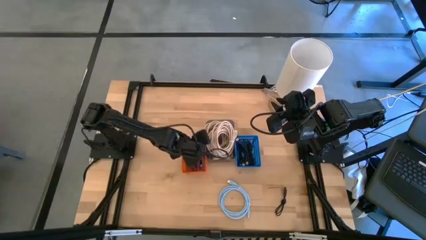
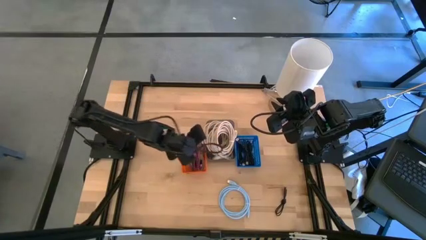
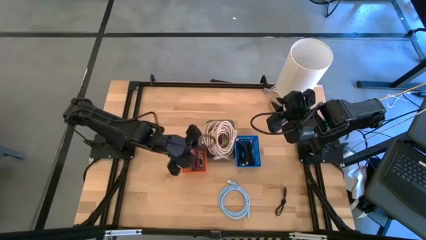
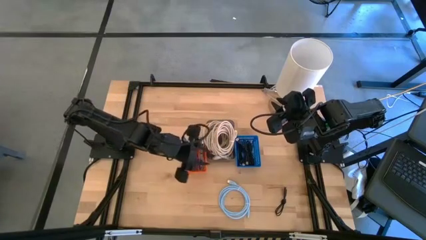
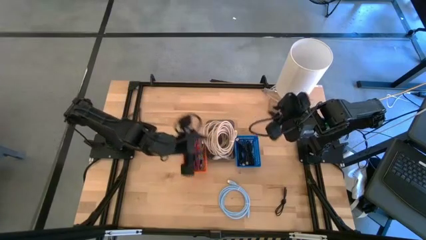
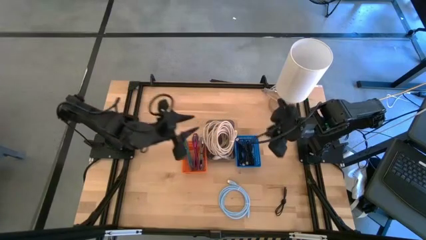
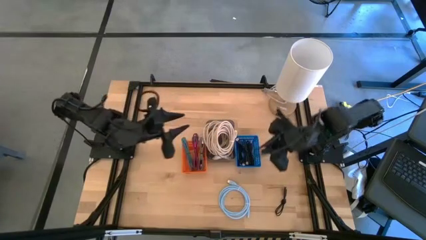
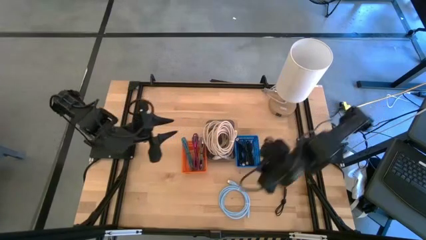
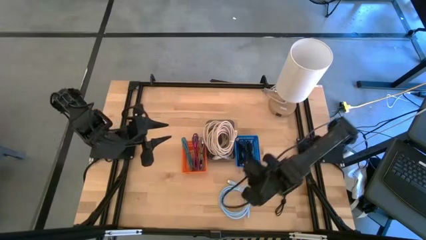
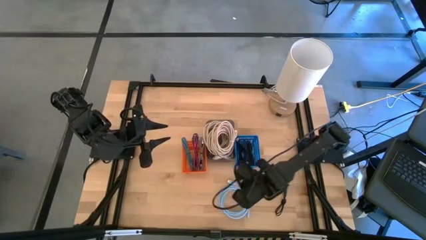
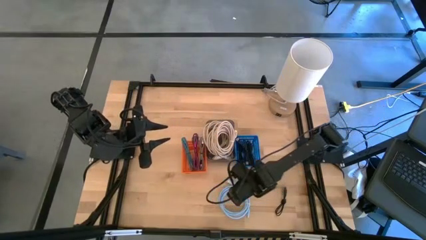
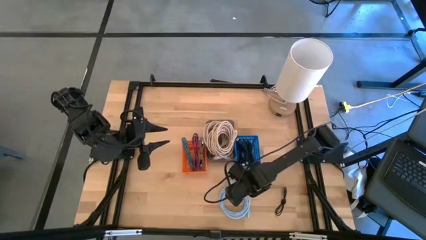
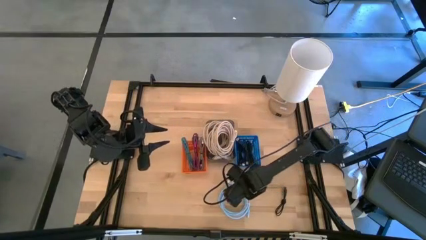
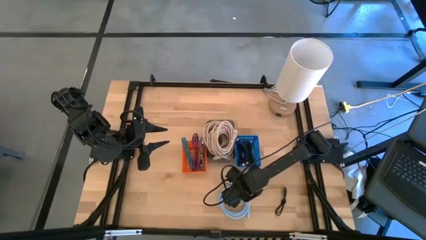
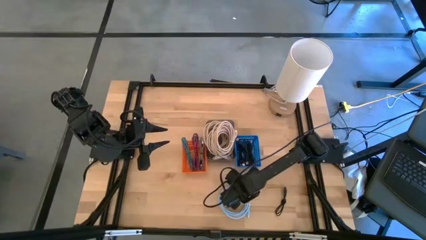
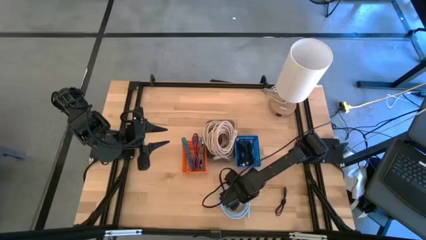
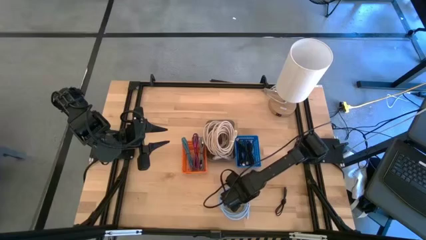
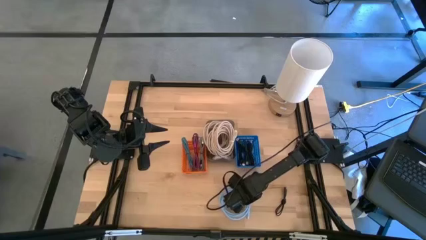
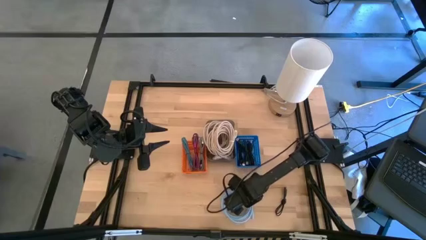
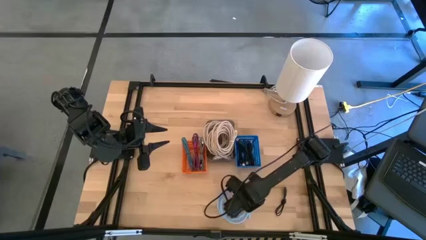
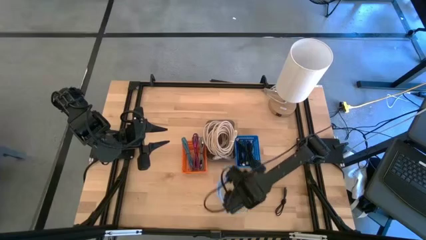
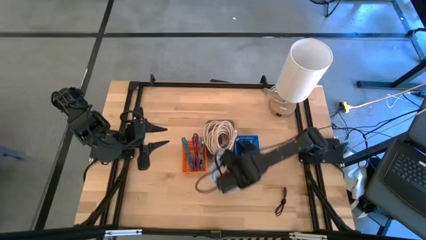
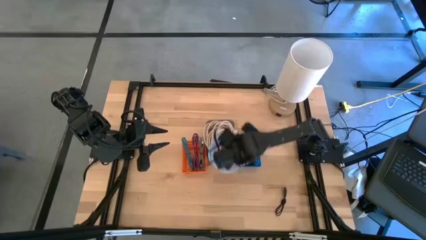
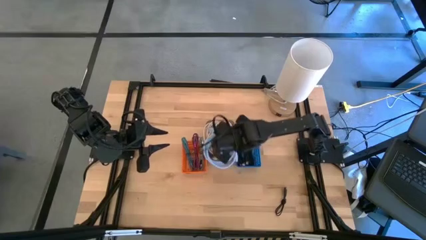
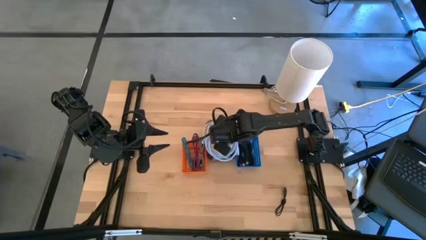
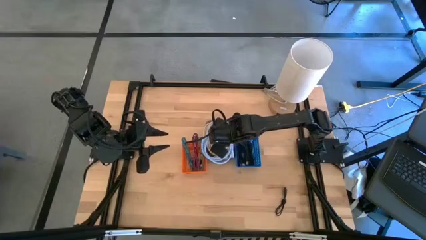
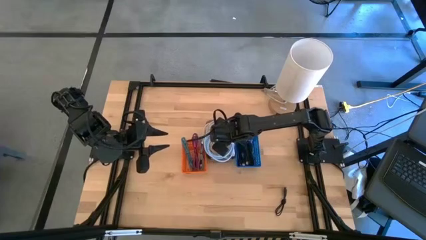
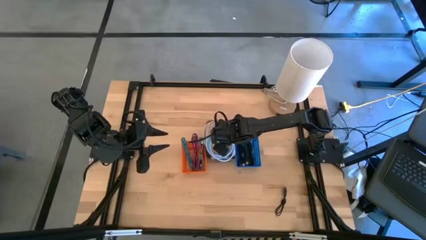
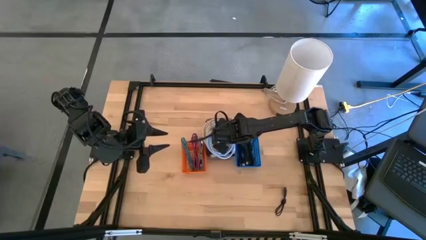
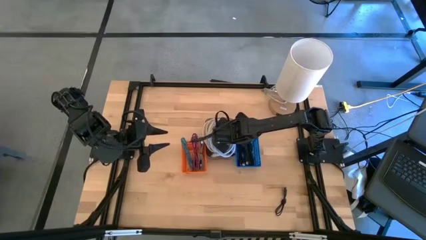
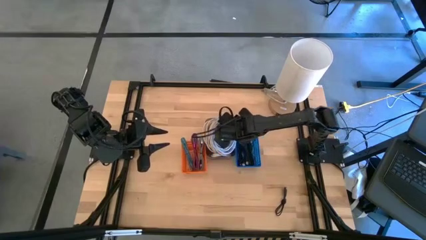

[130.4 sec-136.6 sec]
Task: Pick & Place USB Port
Put the light blue HDMI cable into the black bin

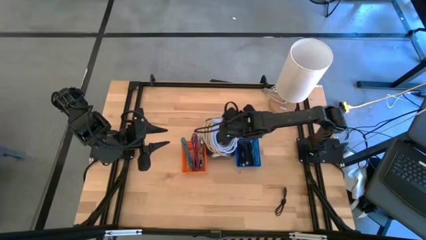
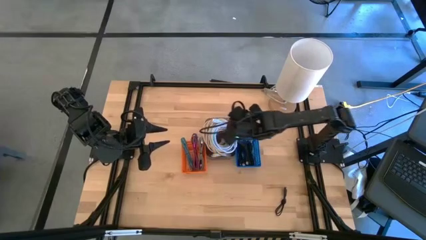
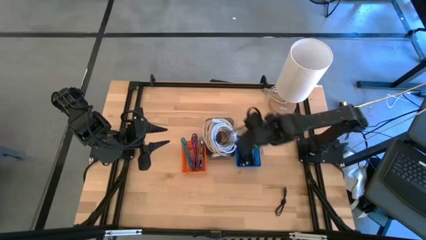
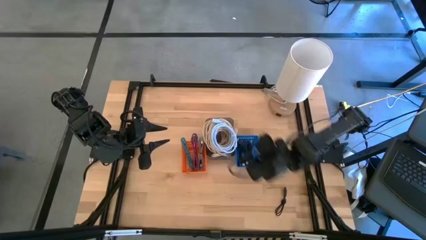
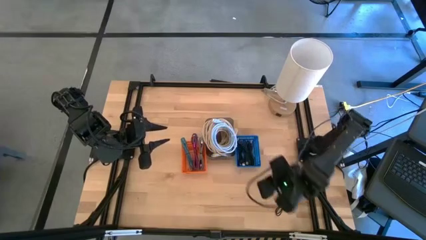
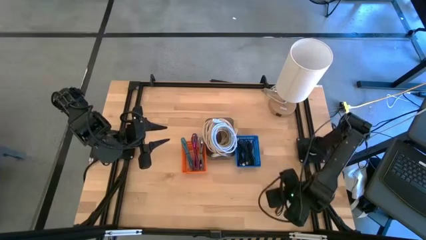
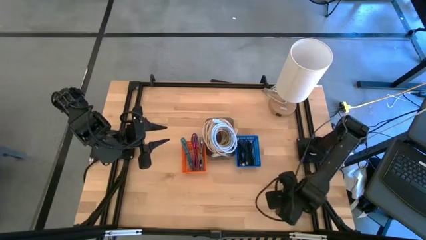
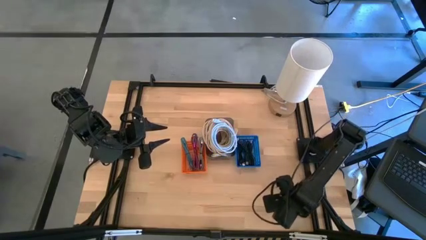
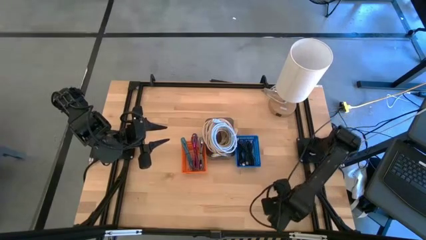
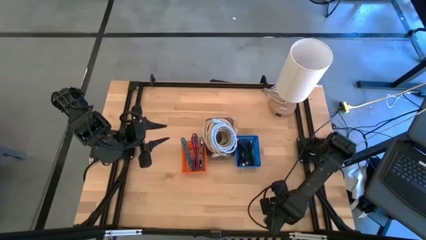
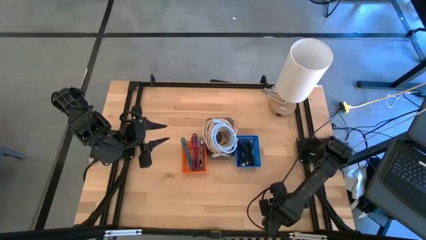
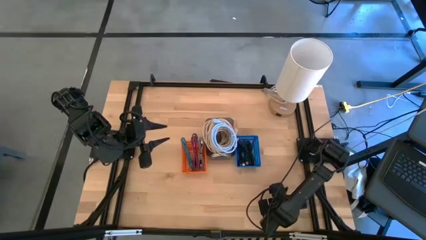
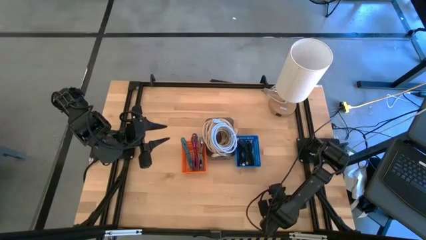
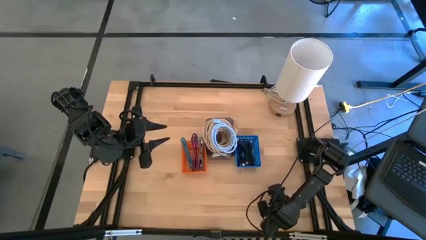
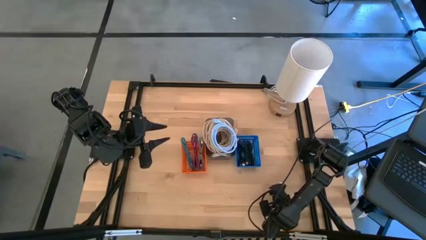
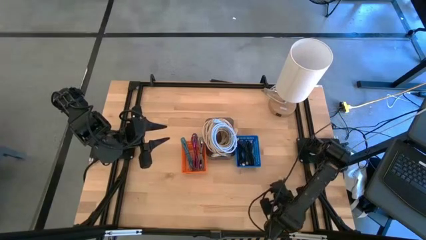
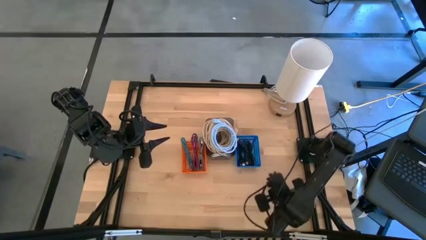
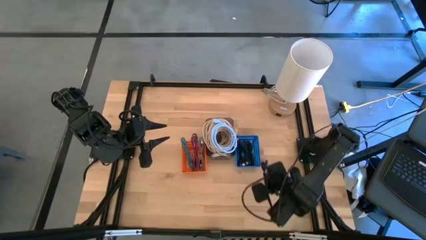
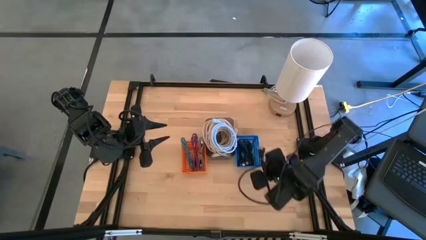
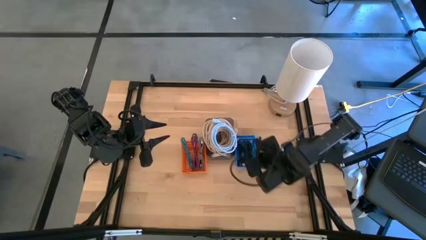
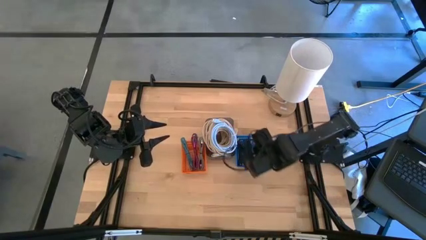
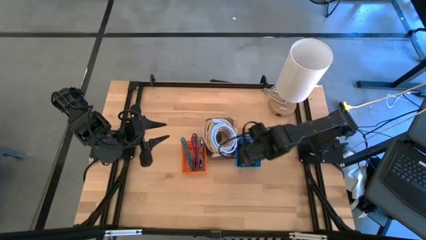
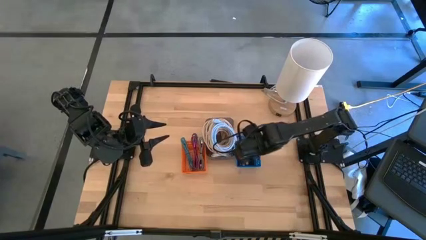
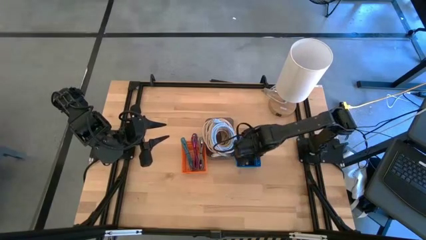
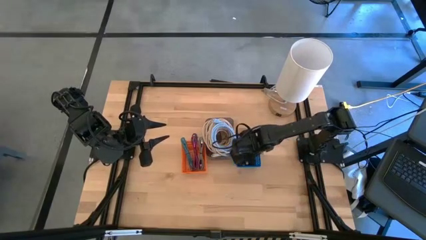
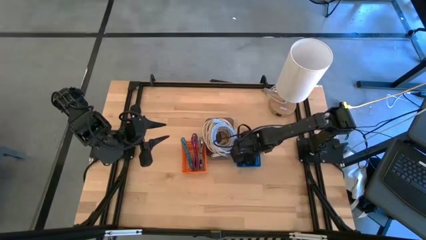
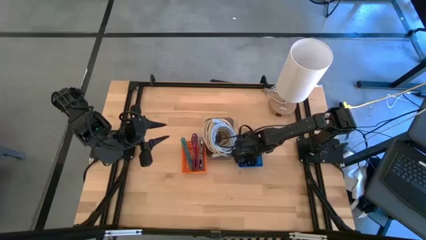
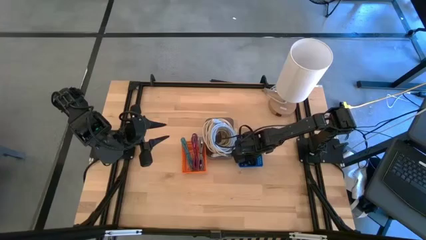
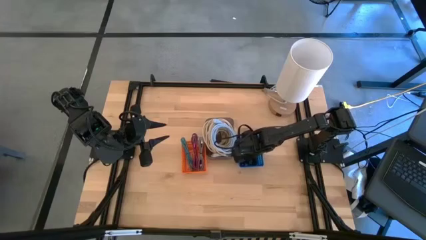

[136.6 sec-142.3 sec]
Put the black charger cable into the blue bin

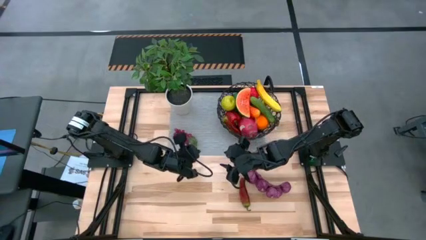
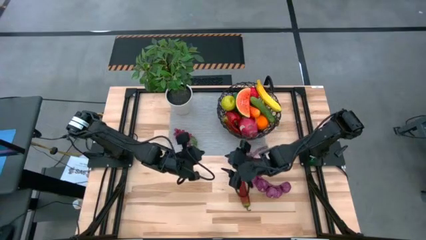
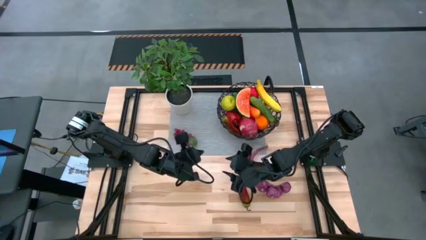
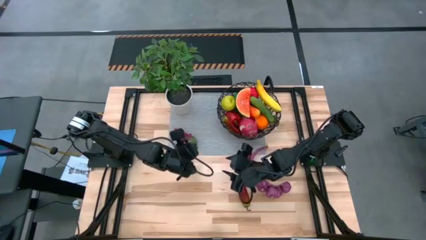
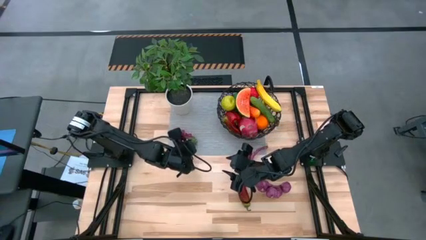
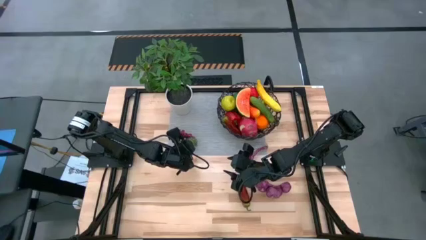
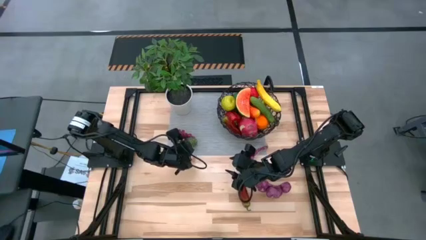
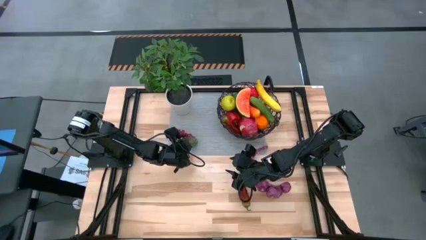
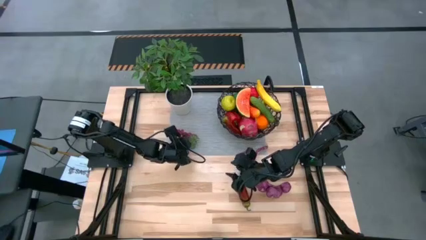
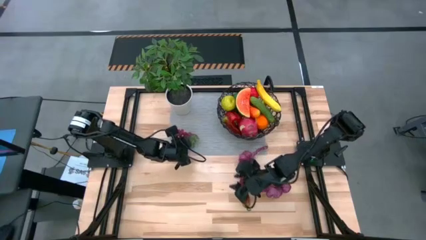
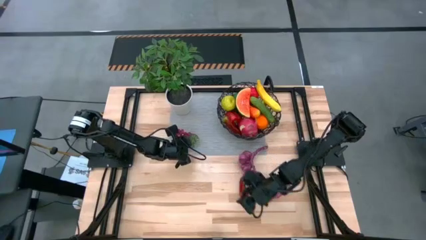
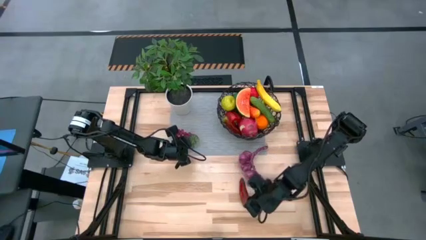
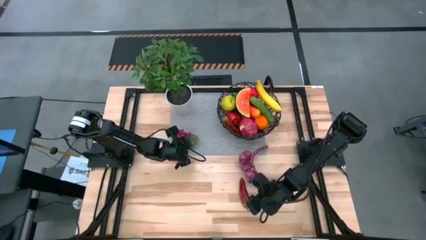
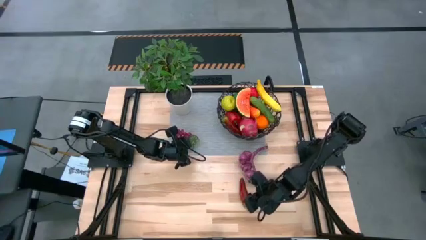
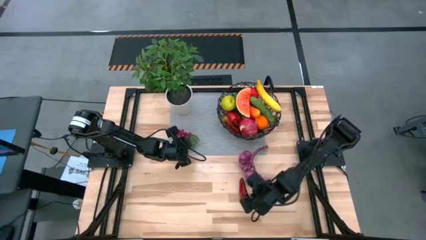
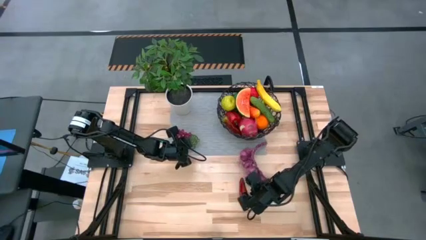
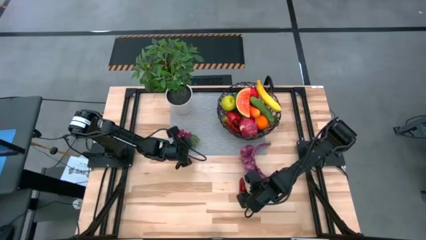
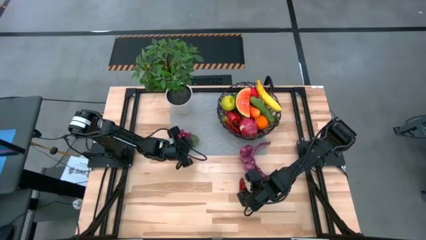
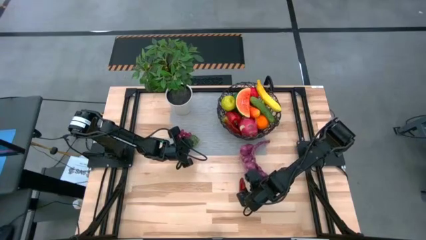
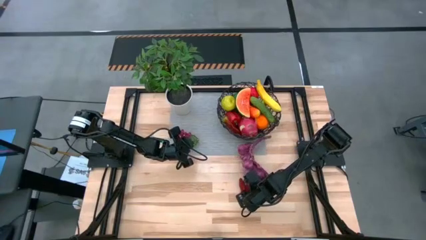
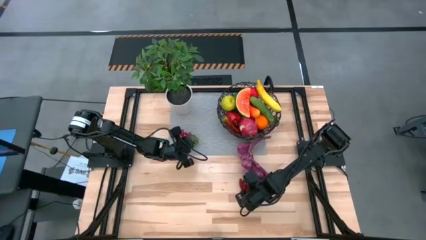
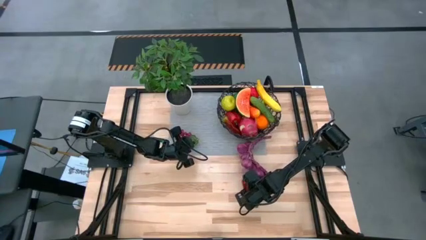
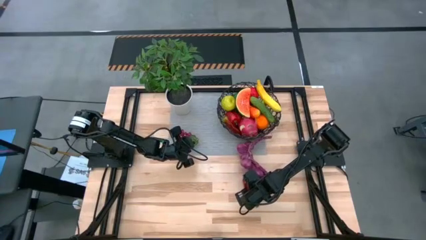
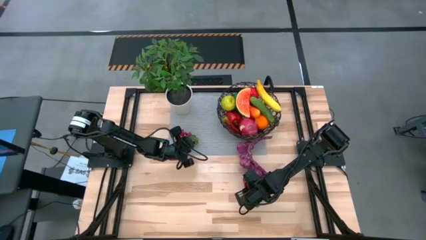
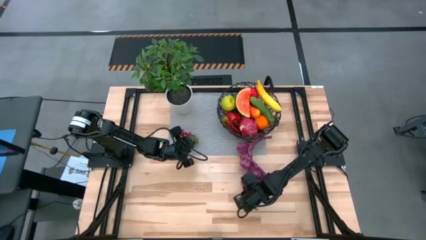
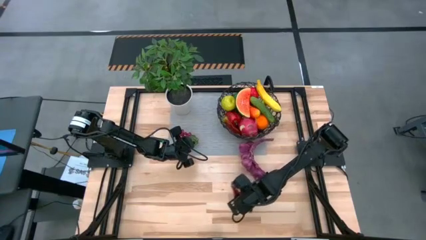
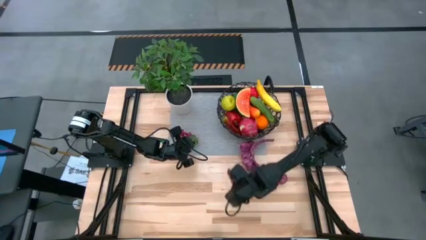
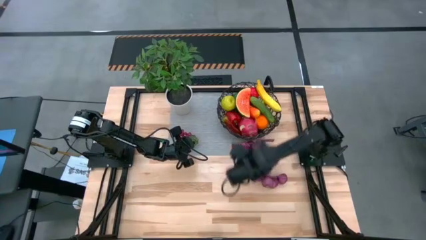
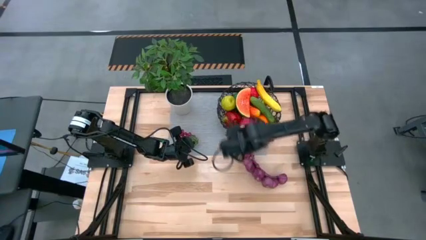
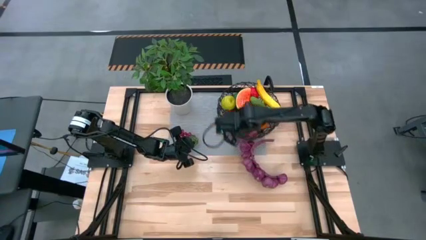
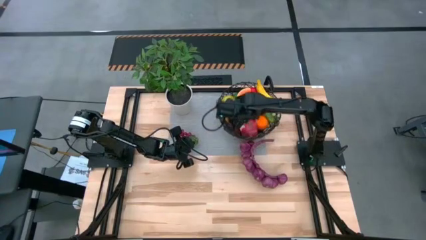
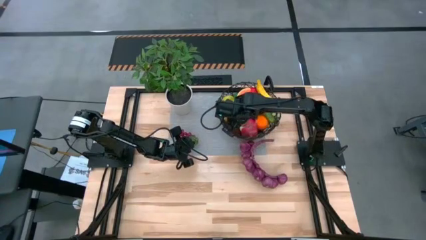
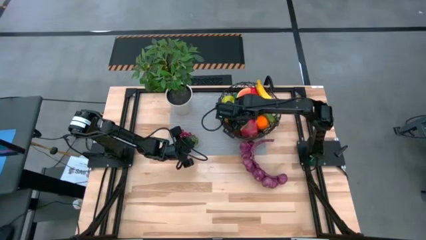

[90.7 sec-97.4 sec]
Task: Build produce basket
Put the dark red chili pepper into the wire basket
